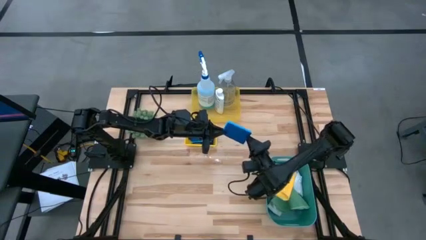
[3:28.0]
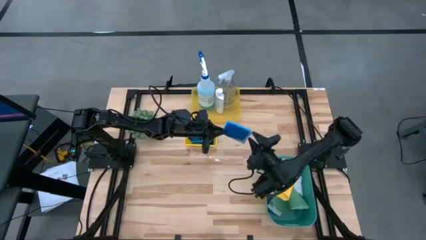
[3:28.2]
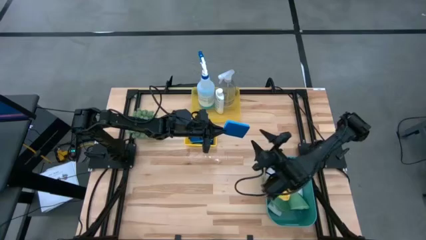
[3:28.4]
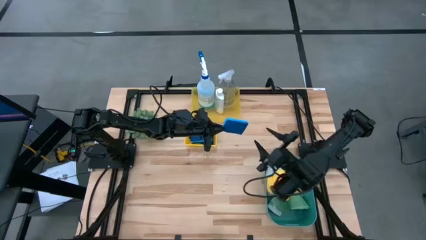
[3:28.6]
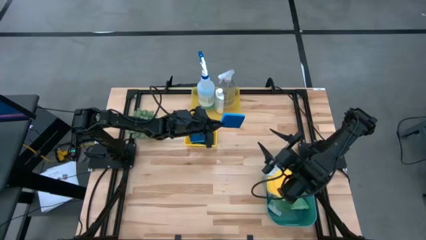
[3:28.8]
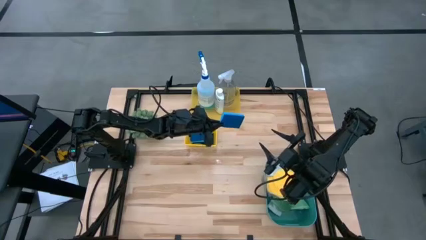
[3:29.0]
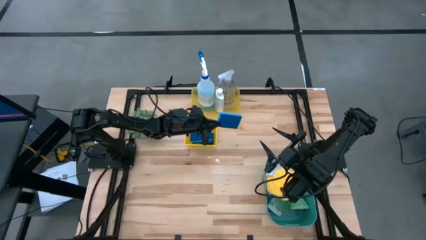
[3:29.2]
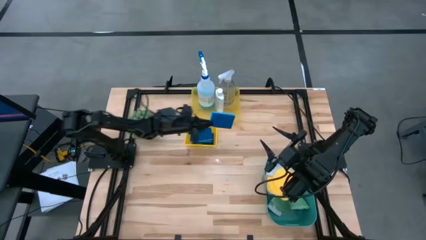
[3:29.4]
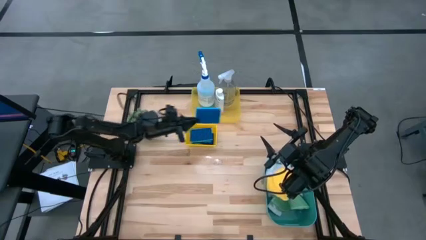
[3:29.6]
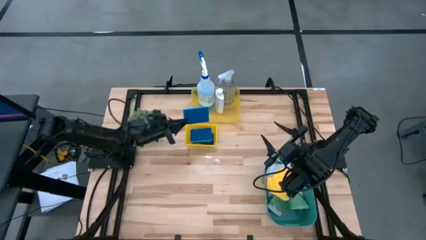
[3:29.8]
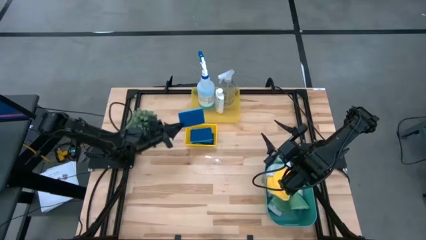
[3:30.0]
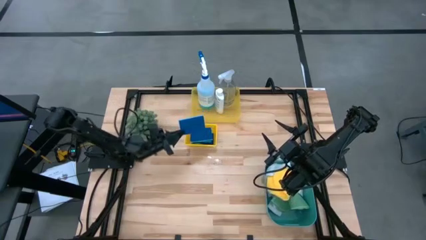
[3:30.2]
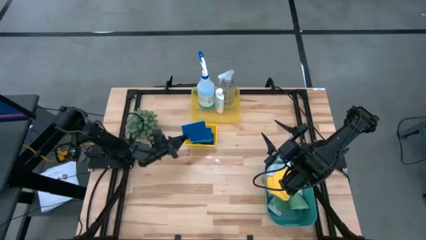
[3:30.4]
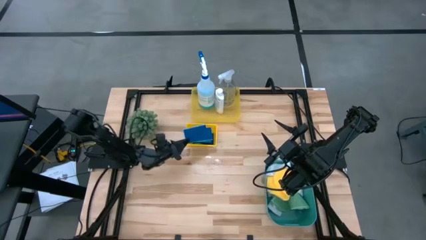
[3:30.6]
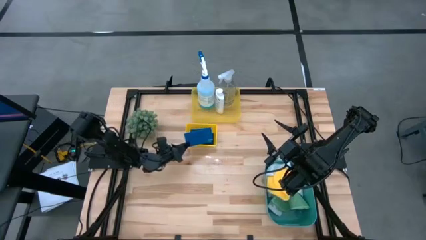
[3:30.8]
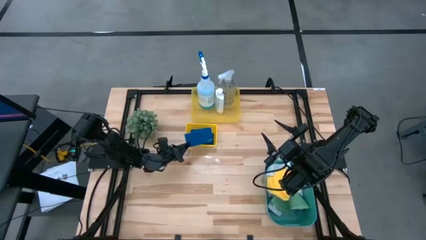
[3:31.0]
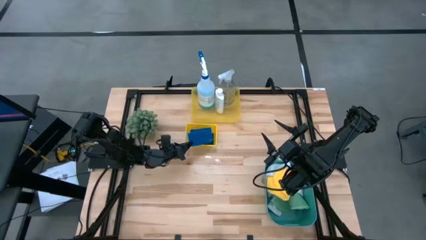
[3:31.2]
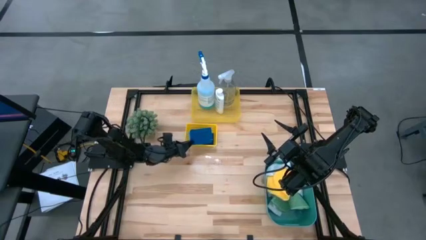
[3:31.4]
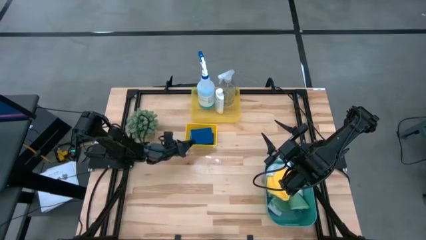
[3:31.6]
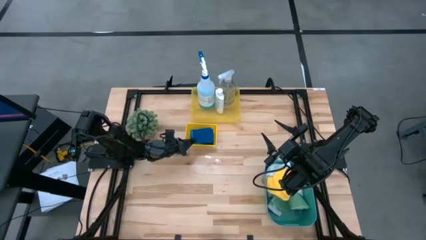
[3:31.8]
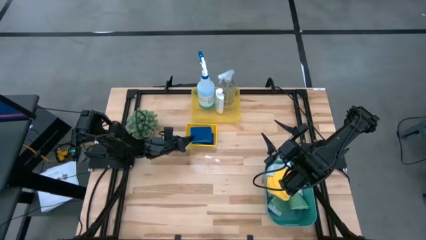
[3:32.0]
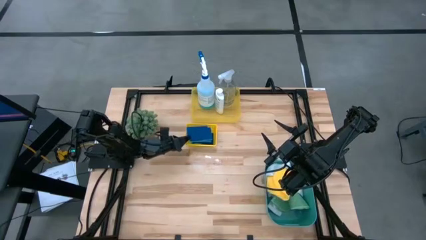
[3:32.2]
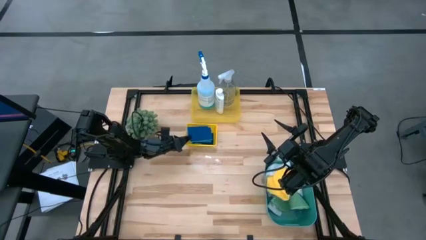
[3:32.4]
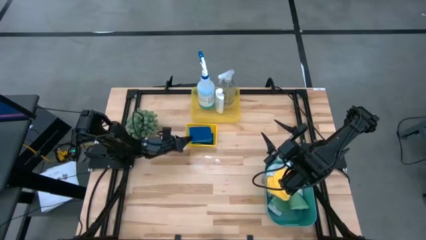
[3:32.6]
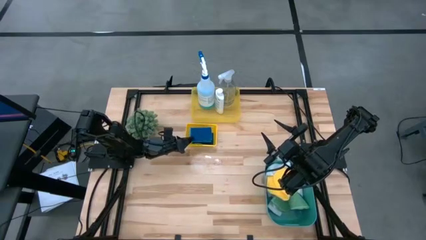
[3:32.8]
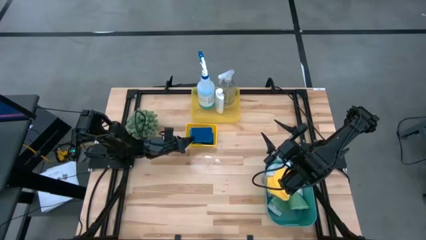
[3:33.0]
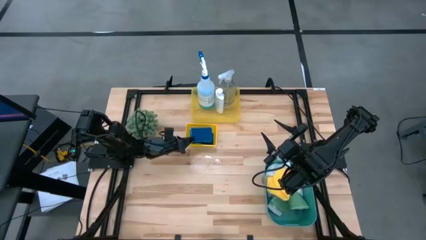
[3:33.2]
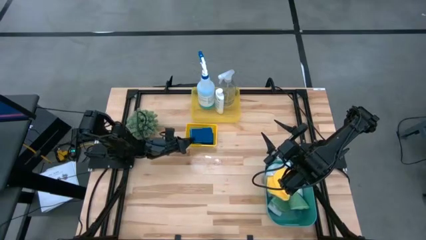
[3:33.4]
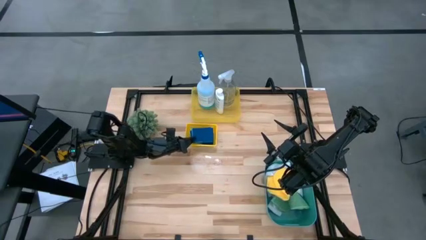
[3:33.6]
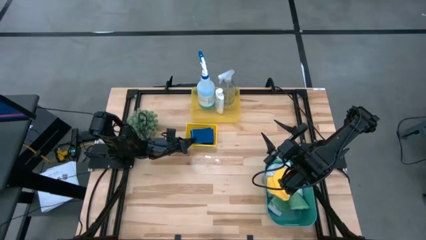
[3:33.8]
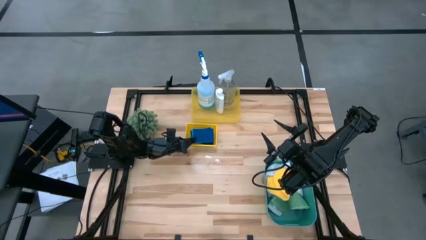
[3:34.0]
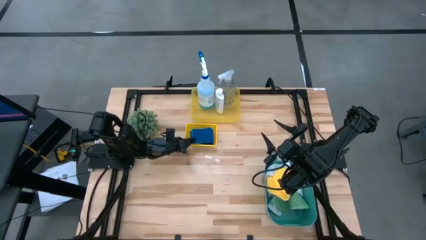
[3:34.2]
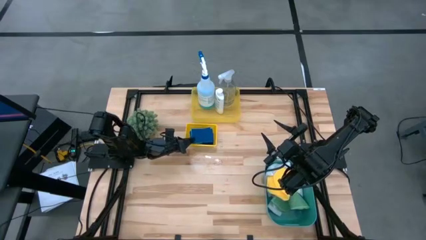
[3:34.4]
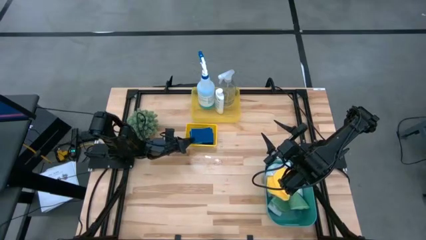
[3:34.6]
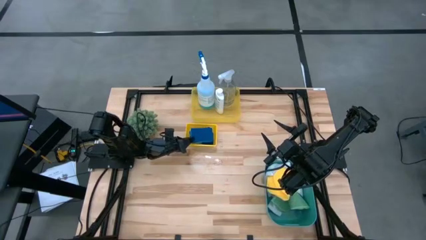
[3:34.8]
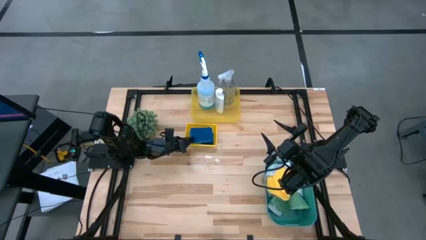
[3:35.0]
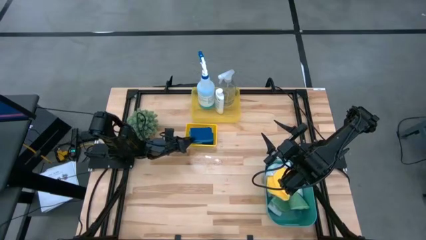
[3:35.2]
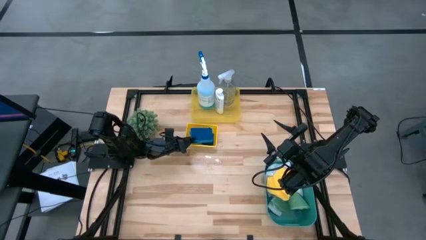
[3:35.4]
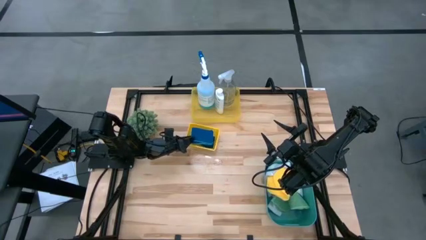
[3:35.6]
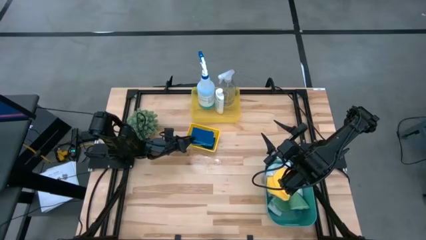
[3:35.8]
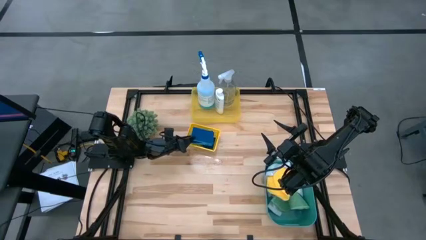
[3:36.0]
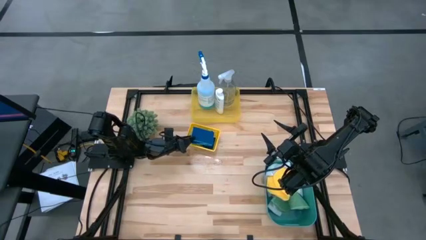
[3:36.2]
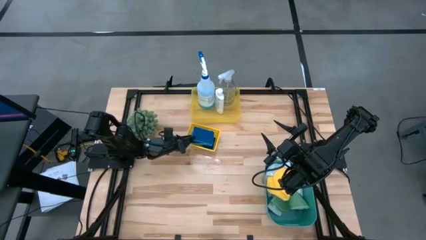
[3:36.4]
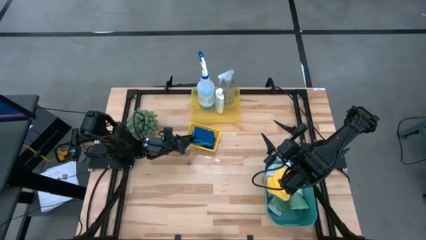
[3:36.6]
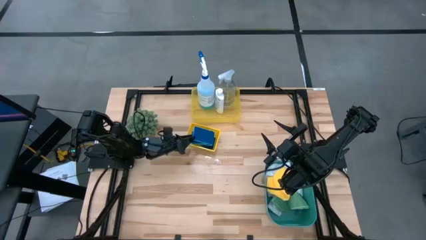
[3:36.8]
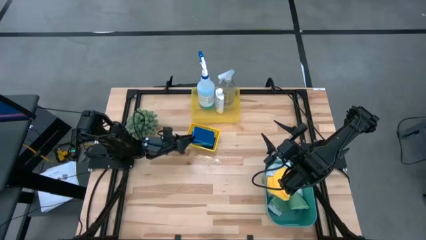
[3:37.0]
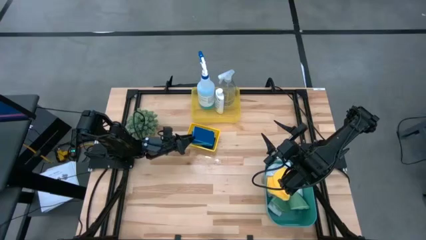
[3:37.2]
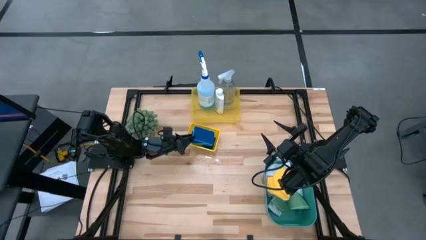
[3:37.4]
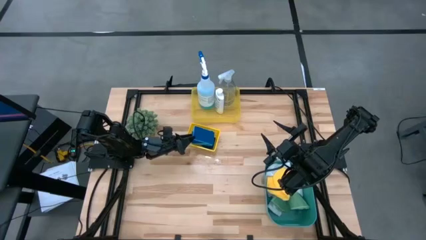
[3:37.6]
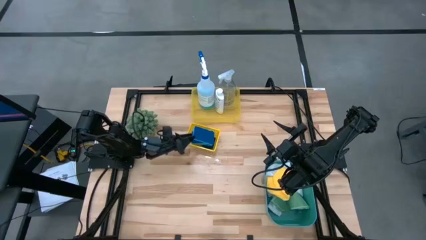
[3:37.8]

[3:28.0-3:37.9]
Task: Pick & Place Kitchen Items
Put the blue sponge into the bottom yellow bin

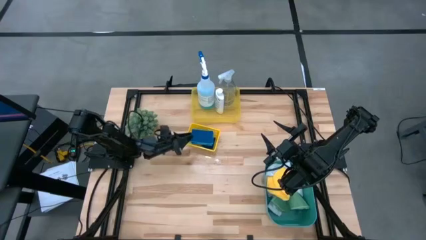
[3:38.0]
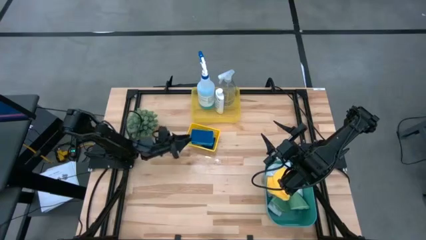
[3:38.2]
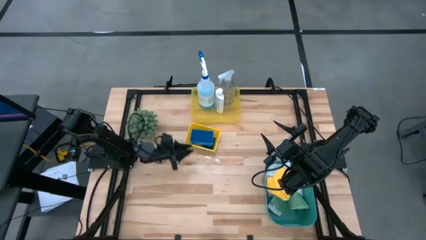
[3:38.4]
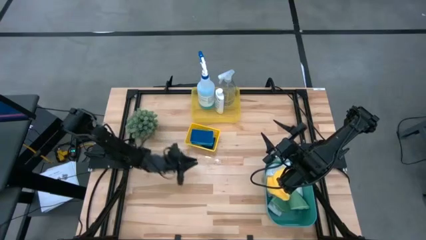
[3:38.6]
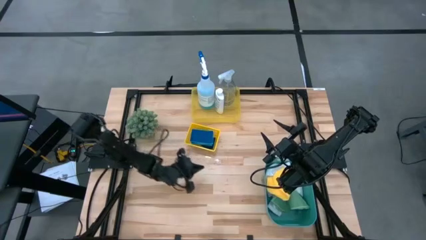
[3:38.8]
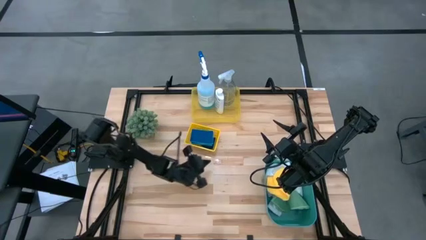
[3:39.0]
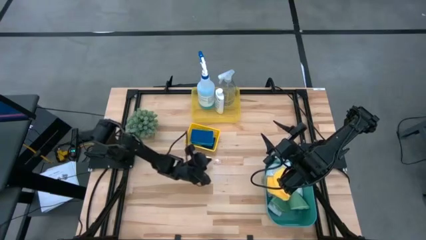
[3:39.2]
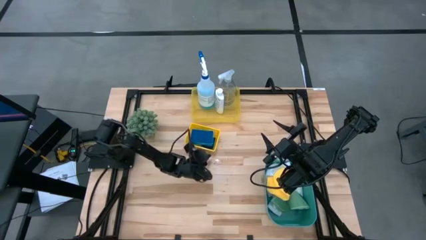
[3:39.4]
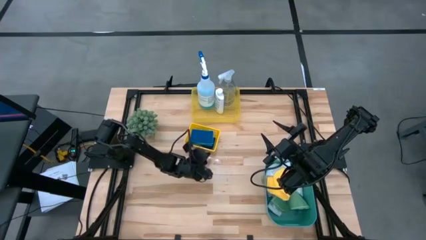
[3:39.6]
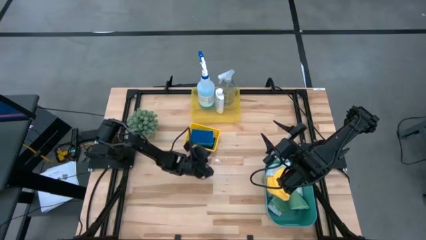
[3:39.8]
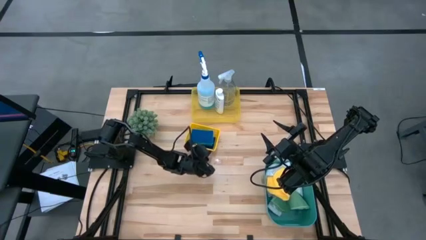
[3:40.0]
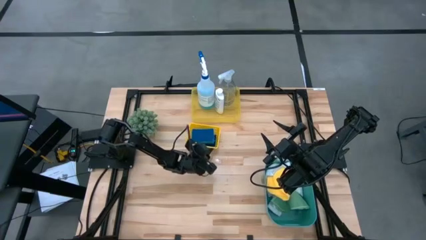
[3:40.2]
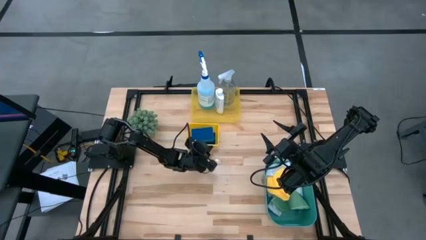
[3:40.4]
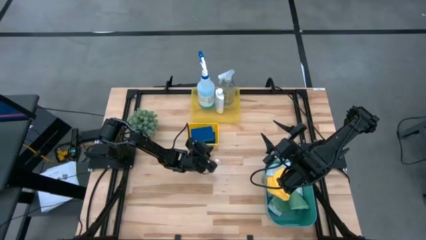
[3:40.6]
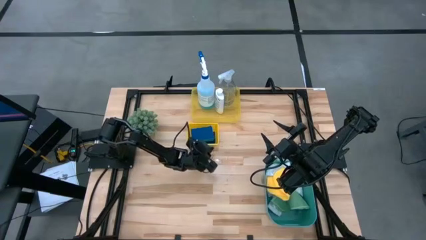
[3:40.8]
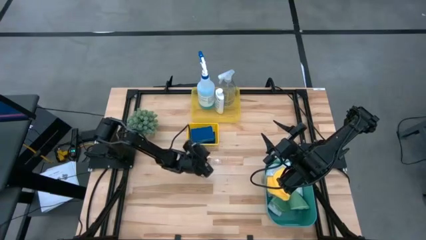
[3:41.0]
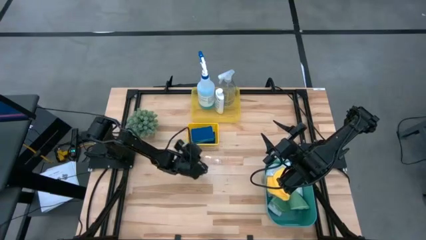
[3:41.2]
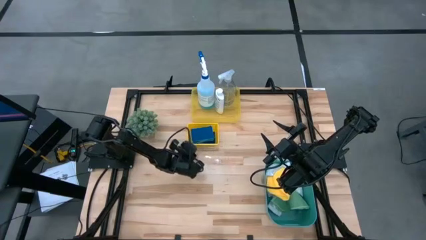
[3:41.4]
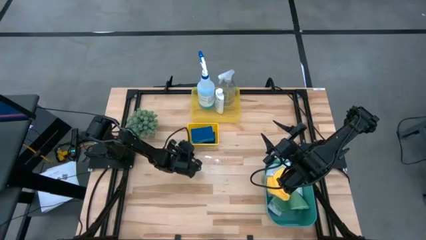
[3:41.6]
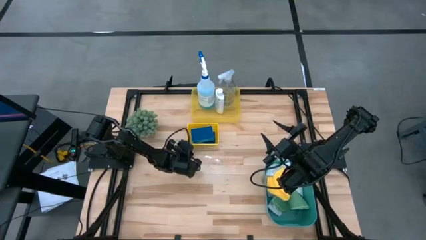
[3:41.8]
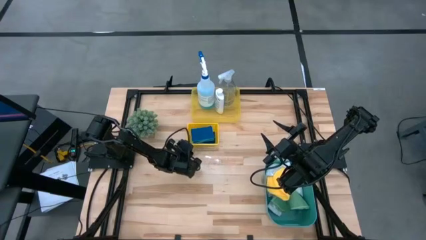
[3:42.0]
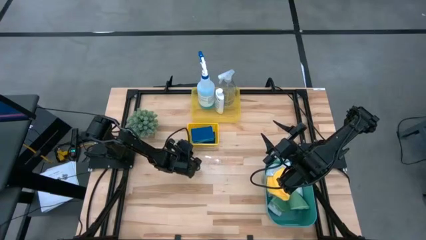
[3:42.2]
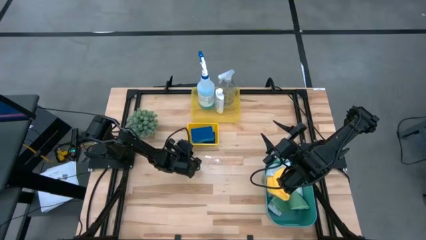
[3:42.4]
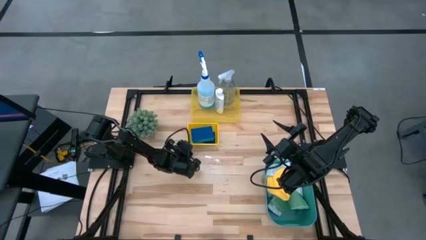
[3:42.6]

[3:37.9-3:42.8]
Adjust the bottom yellow bin on the table
